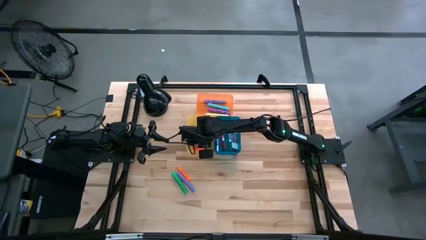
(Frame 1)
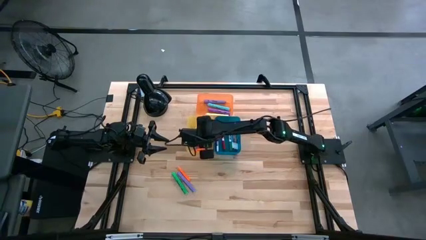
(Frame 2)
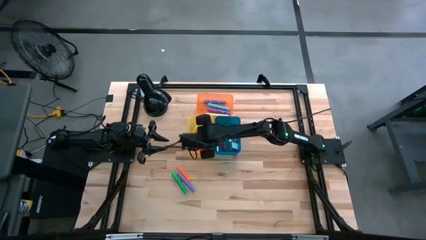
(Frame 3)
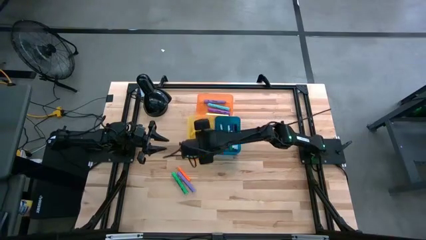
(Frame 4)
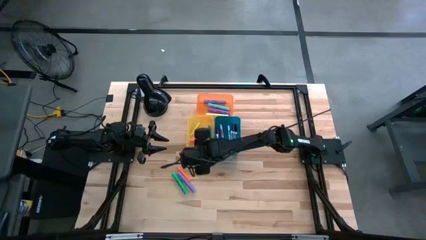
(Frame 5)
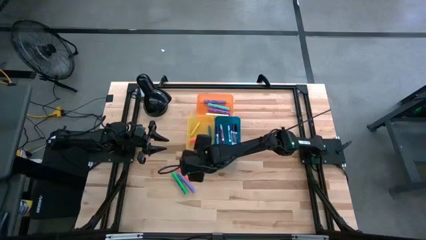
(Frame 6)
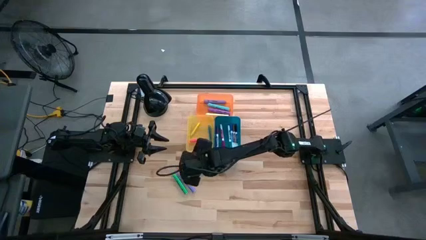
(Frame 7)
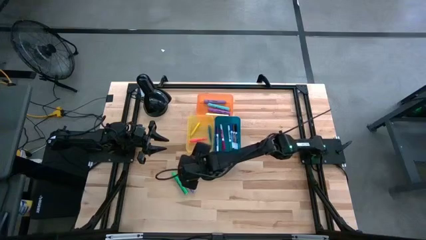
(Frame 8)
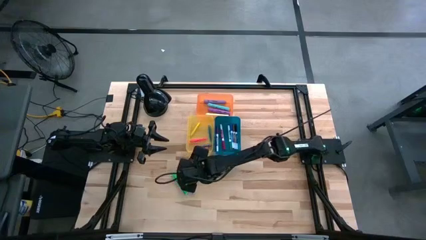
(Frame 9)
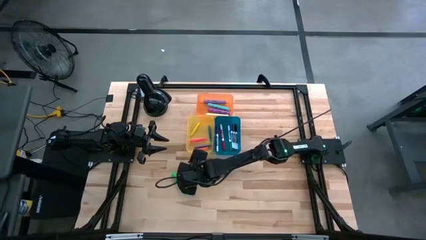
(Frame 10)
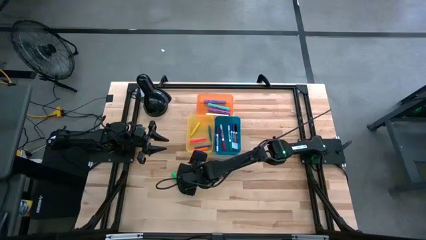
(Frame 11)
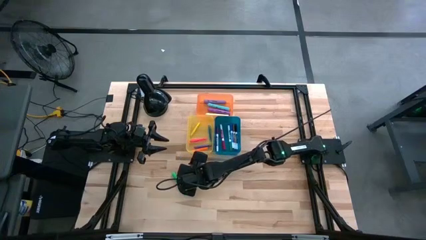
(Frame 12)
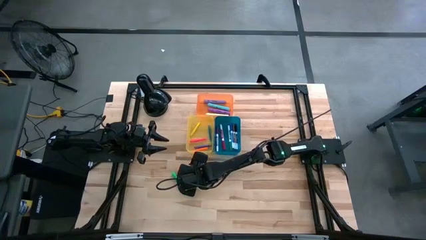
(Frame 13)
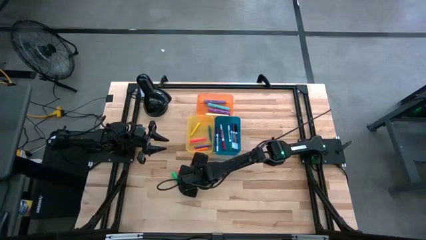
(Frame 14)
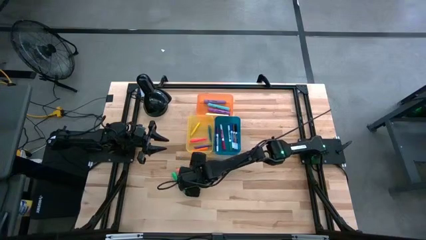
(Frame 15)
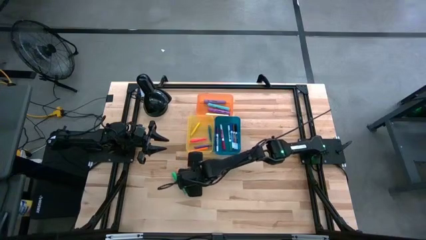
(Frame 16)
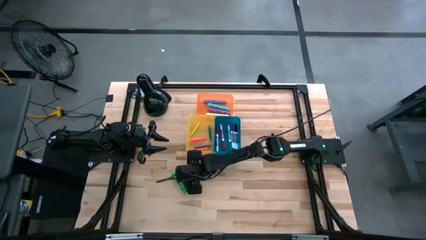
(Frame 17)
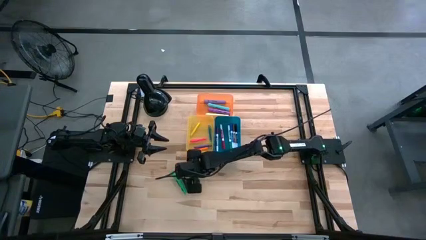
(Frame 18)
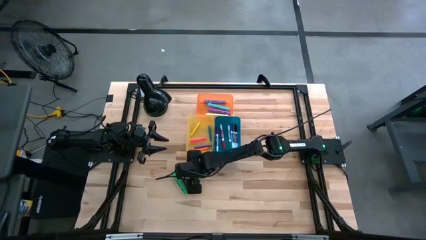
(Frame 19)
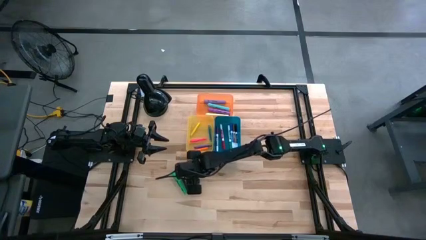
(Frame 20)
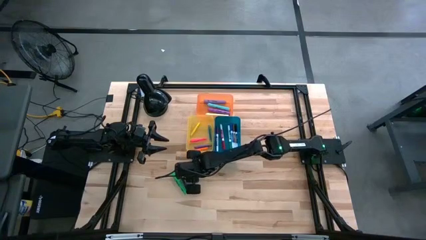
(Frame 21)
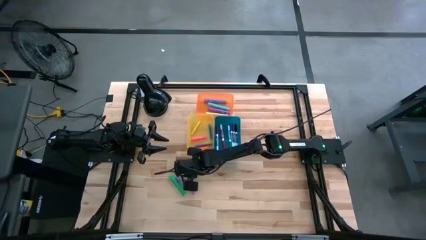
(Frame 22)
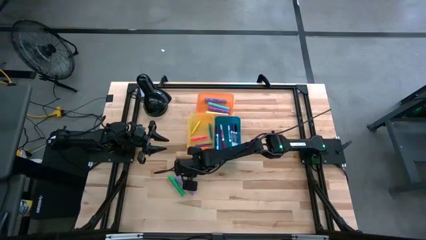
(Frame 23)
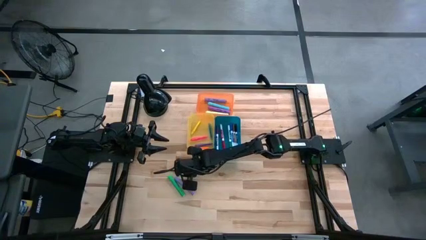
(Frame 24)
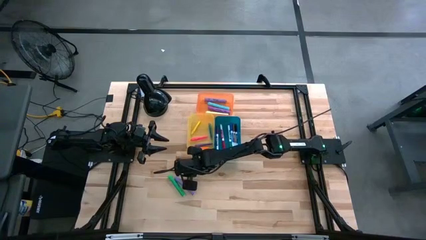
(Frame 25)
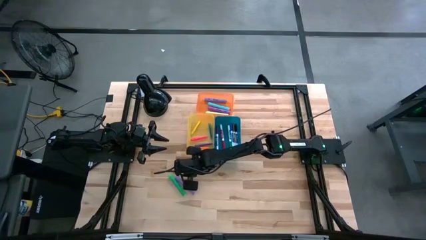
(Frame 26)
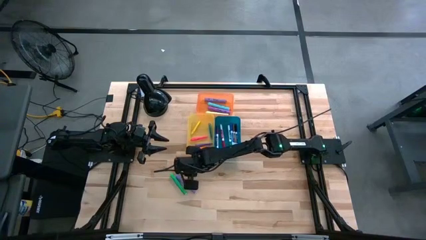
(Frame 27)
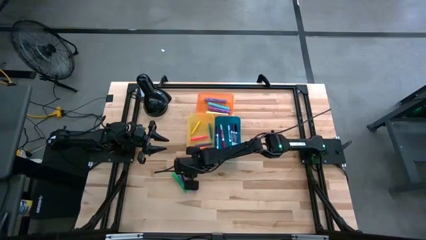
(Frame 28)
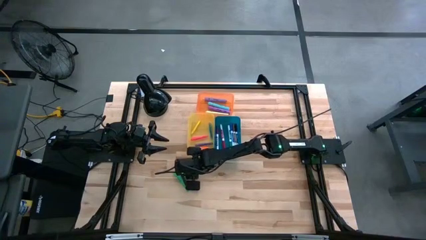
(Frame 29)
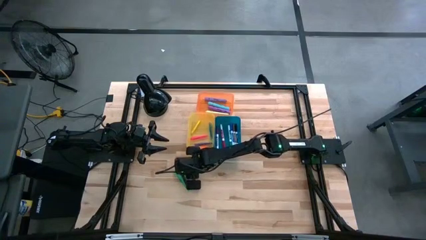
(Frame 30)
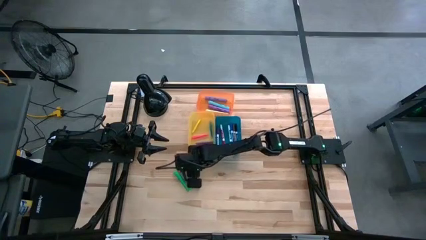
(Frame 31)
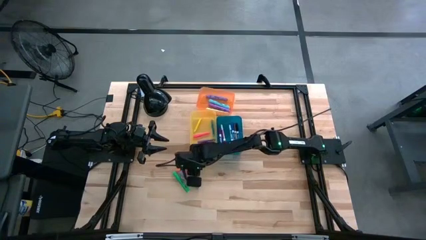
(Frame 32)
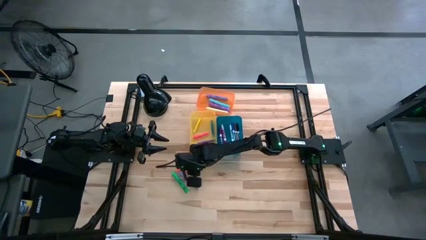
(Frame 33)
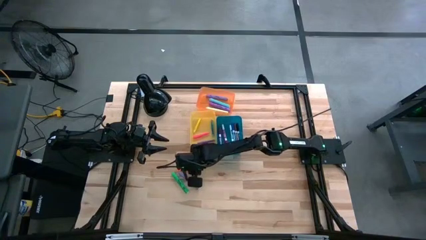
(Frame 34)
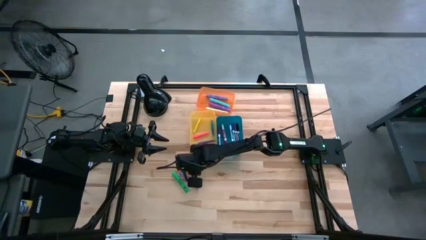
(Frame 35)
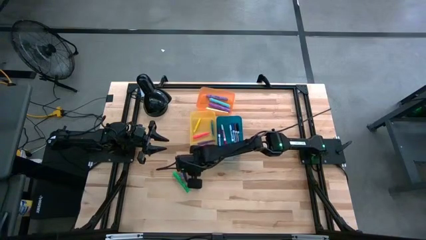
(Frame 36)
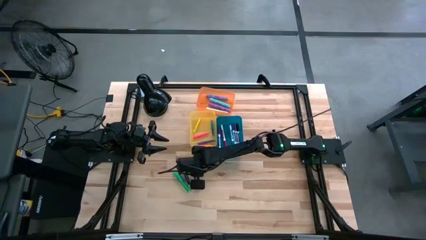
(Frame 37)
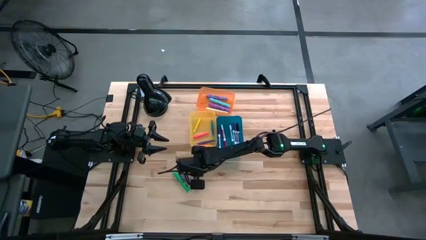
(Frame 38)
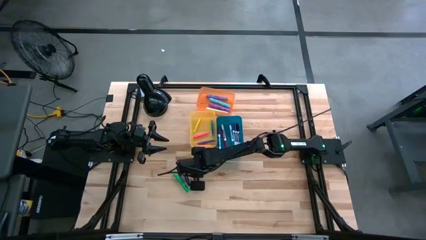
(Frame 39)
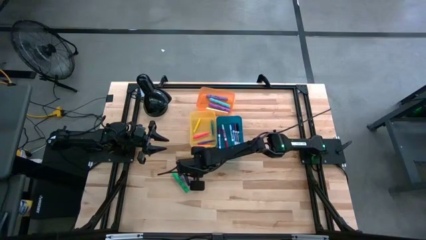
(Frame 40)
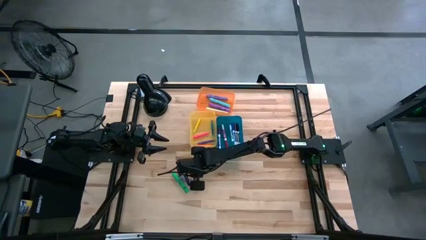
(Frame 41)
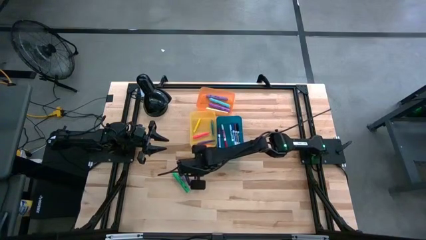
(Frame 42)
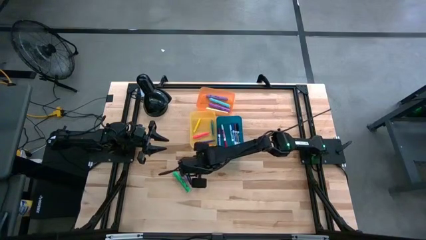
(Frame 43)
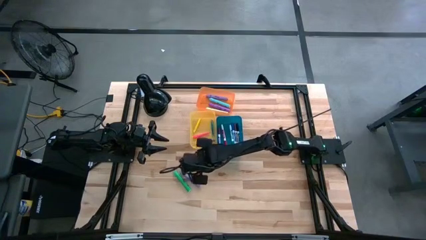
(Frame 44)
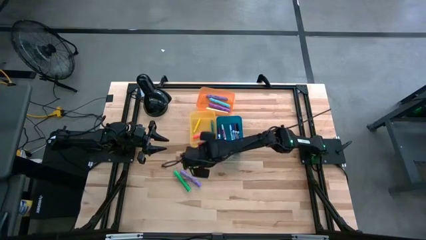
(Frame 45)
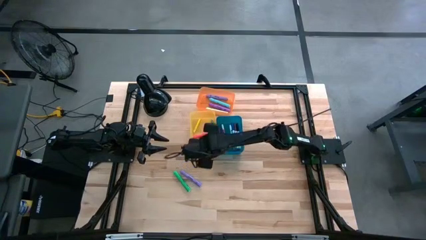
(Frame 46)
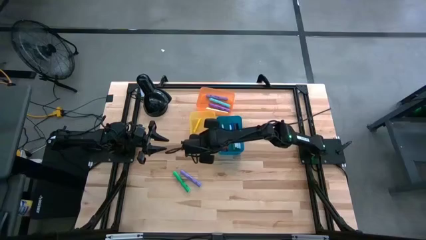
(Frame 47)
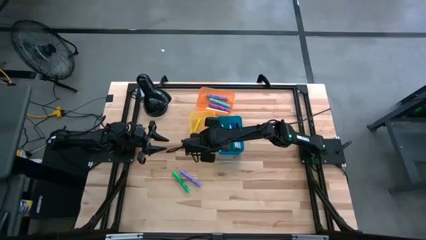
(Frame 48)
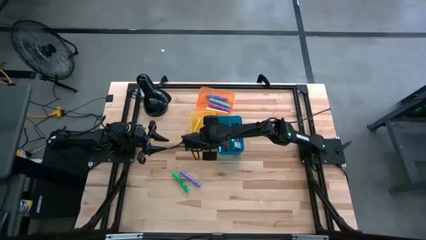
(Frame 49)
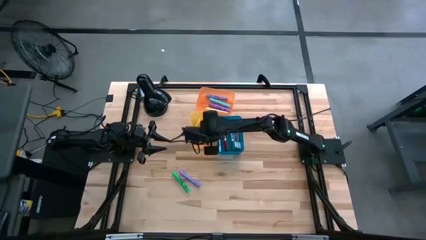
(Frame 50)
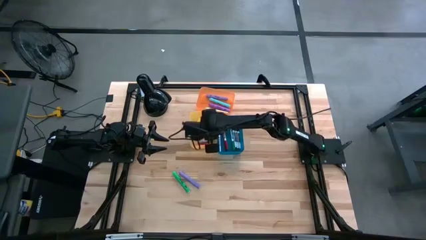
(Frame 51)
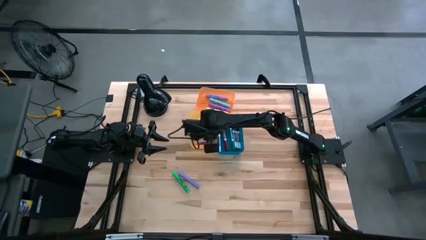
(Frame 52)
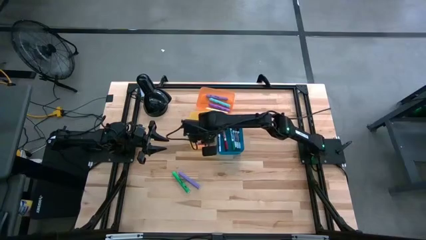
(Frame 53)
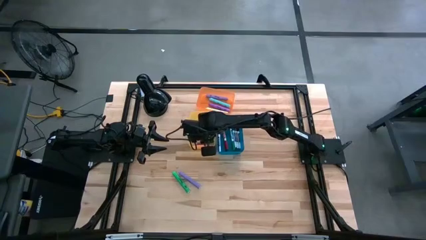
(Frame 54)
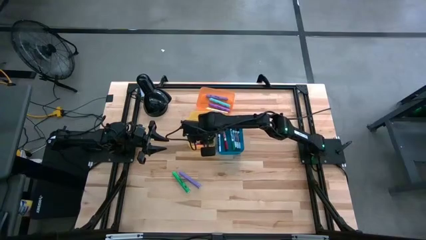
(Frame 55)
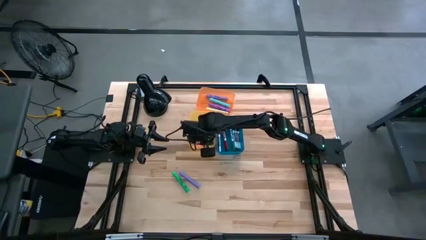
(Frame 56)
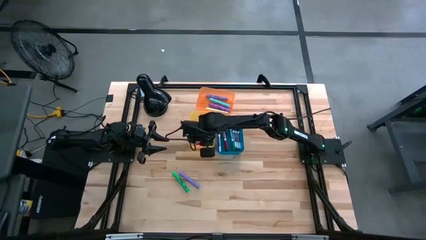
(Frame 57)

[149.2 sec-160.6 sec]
Task: Pick & Place Markers
Put the orange pen into the yellow bin

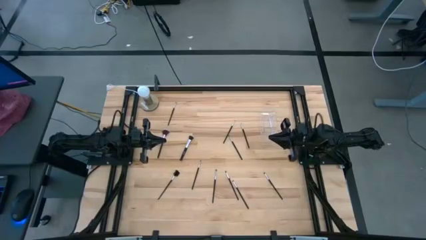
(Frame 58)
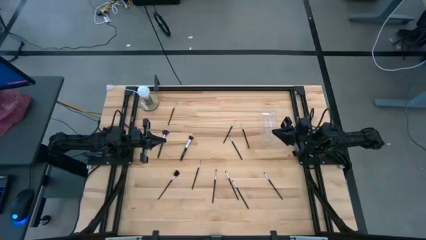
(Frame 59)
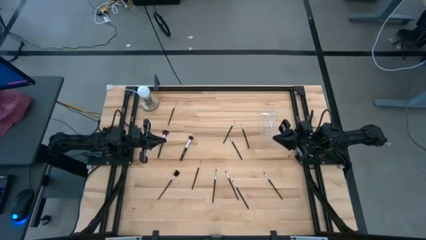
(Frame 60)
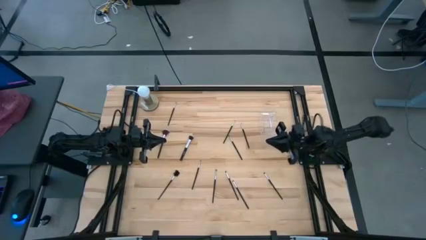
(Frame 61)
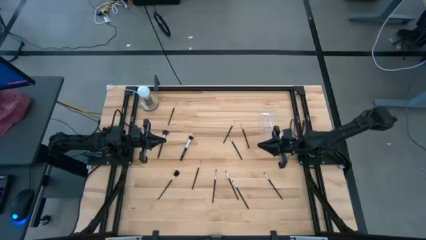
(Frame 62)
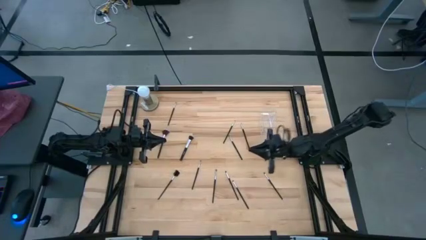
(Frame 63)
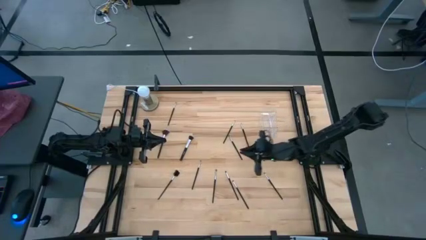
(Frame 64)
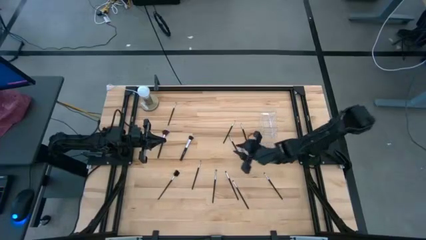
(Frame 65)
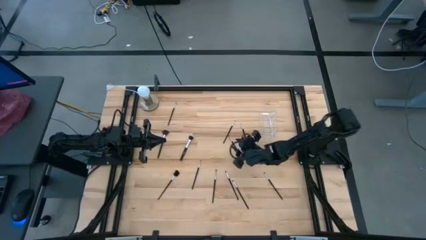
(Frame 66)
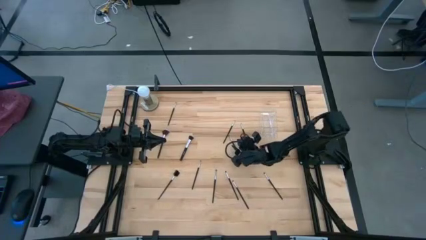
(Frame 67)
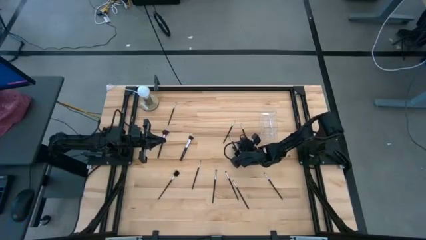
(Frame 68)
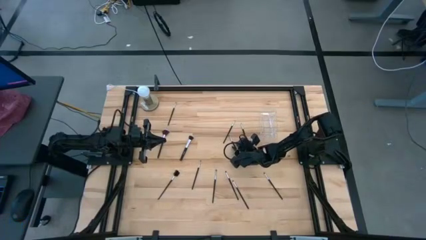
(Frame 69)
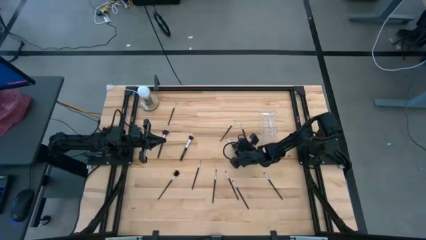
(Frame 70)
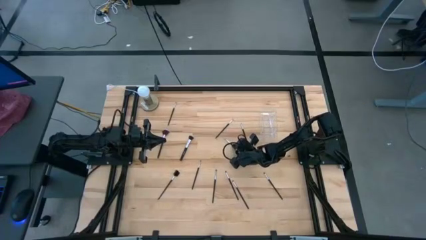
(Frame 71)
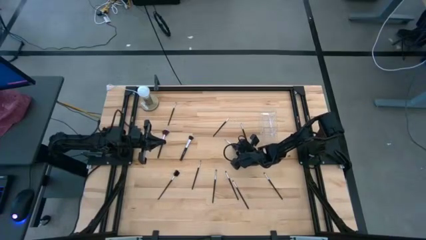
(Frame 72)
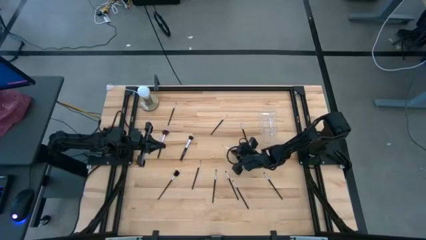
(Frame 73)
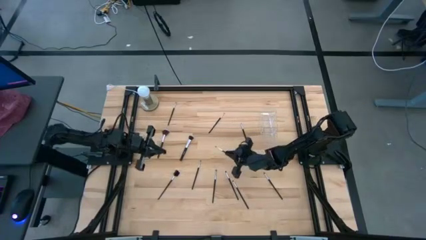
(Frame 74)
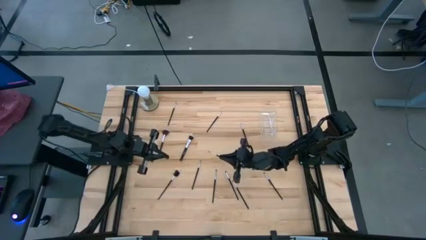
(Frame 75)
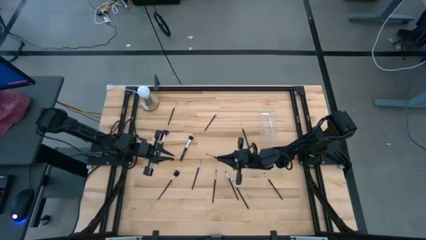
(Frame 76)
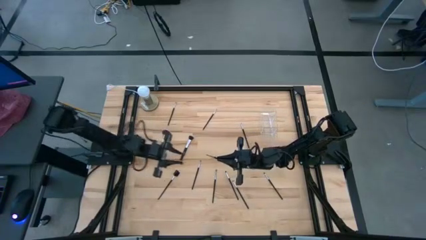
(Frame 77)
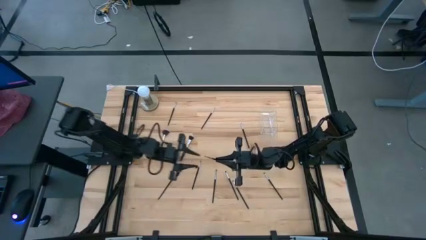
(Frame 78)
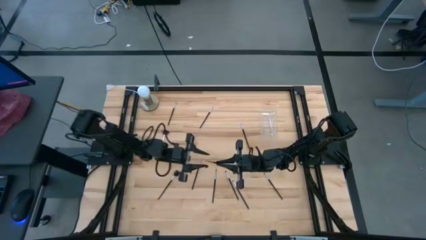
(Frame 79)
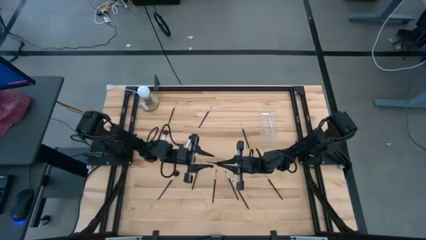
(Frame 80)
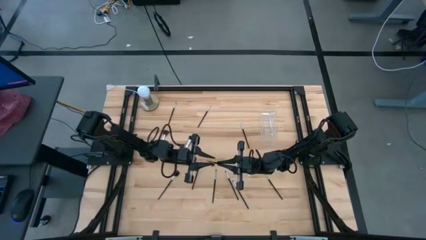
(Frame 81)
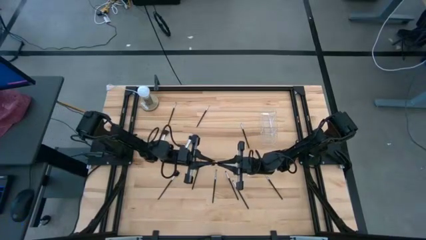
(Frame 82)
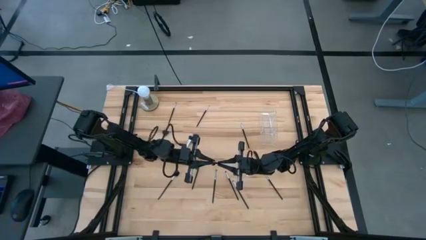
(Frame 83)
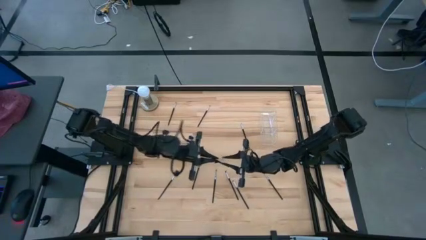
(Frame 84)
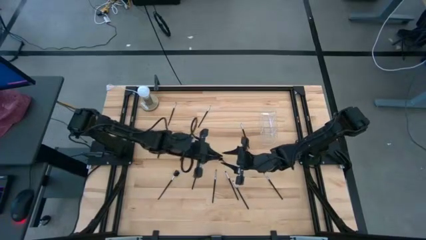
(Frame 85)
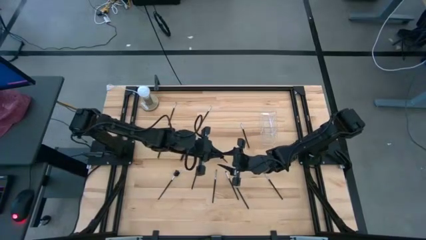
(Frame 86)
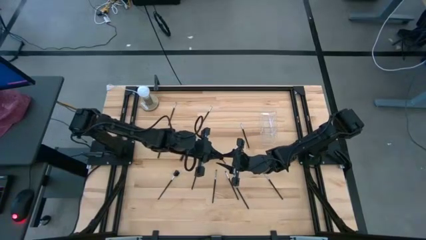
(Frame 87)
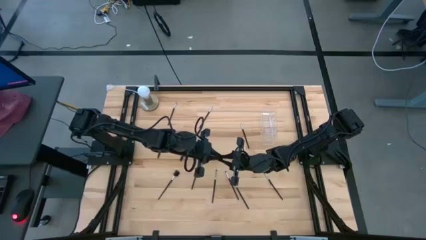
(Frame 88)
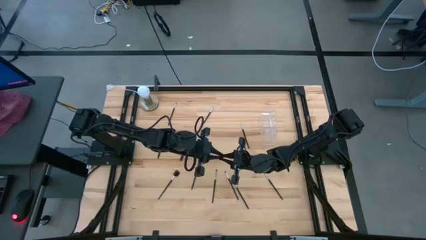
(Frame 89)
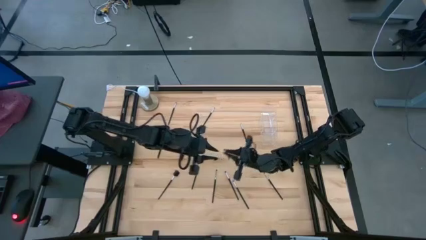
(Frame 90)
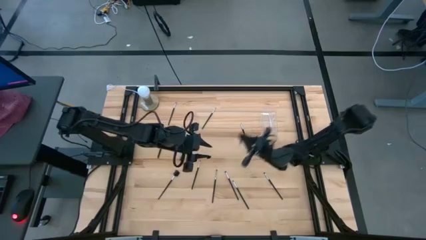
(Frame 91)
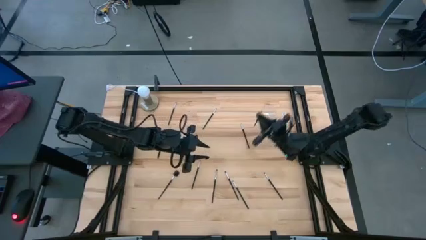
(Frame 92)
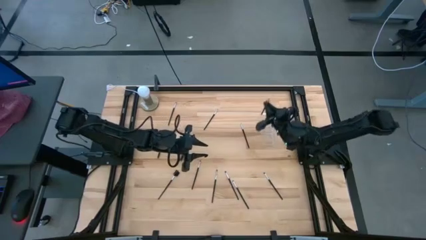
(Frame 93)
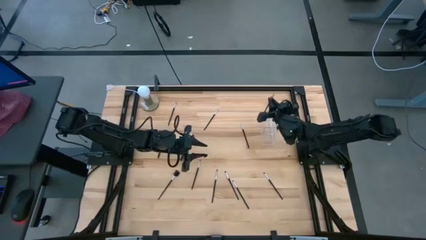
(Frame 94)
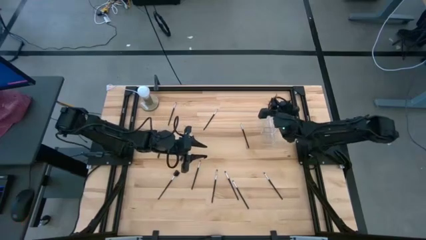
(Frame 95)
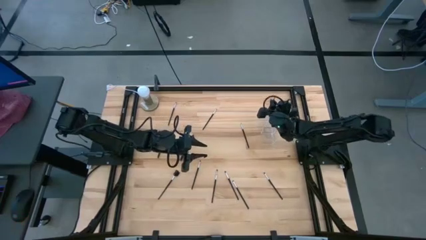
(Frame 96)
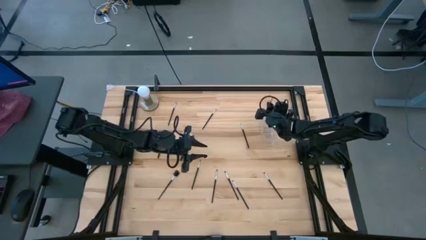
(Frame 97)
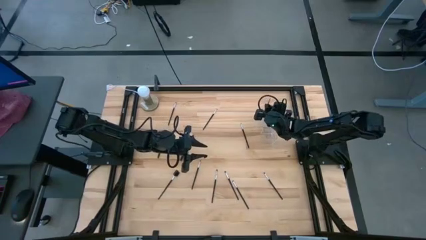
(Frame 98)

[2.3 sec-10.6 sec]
Task: Sort items
Put the silver eyeshadow brush into the transparent organizer
